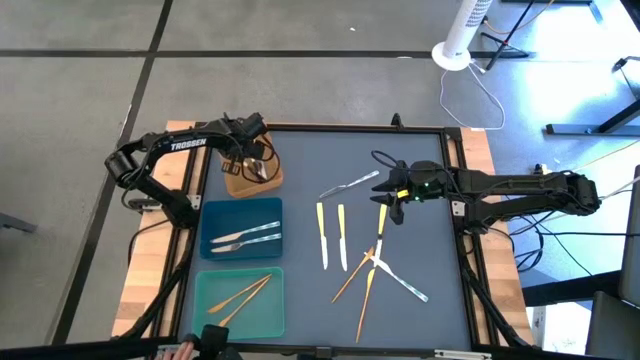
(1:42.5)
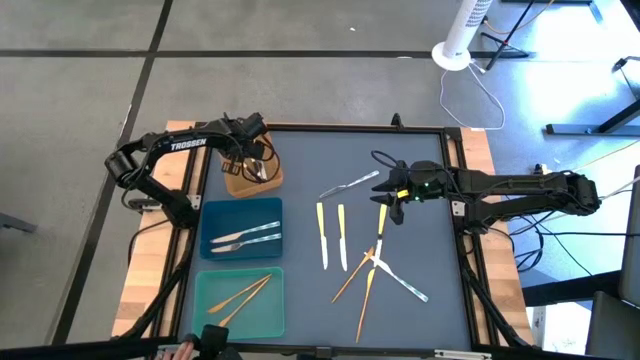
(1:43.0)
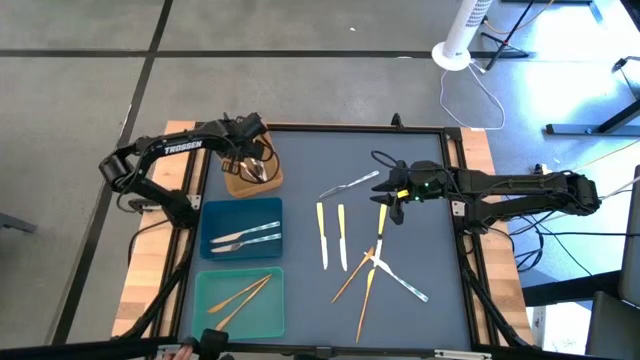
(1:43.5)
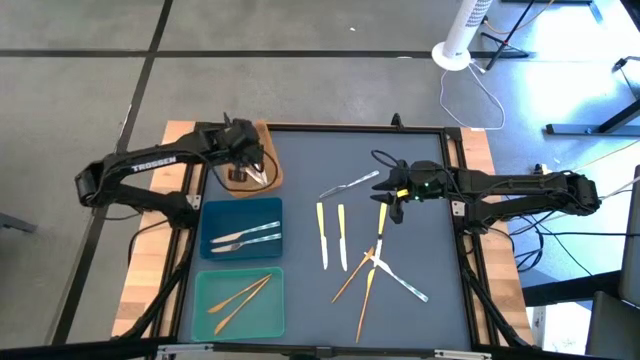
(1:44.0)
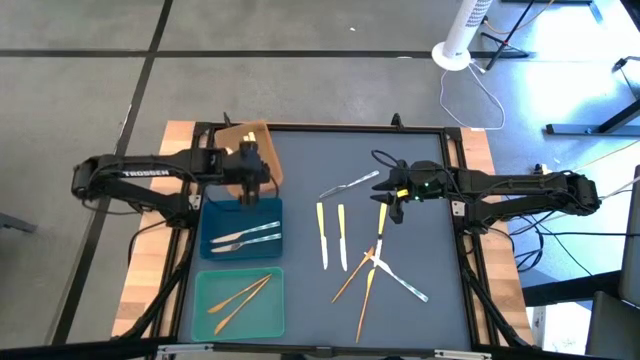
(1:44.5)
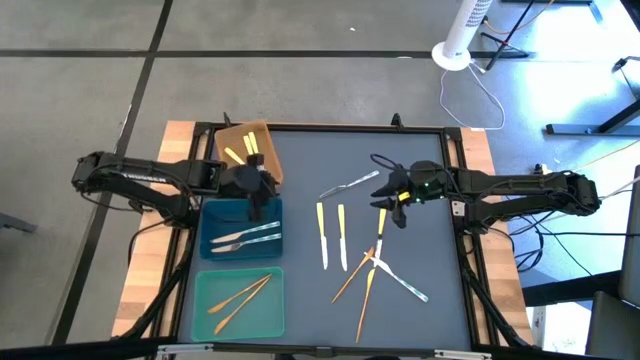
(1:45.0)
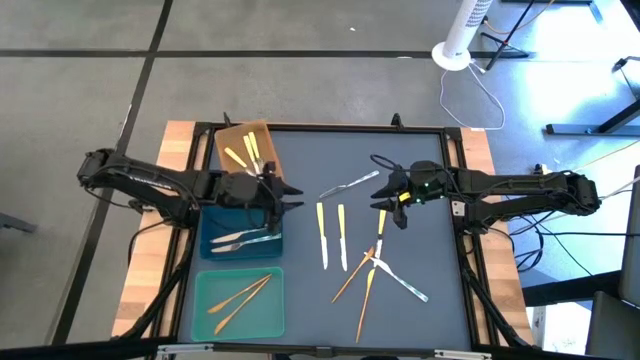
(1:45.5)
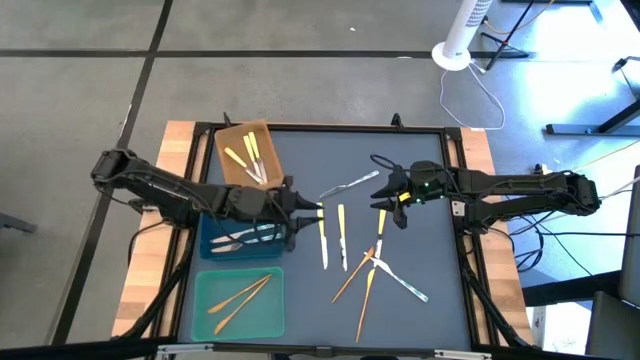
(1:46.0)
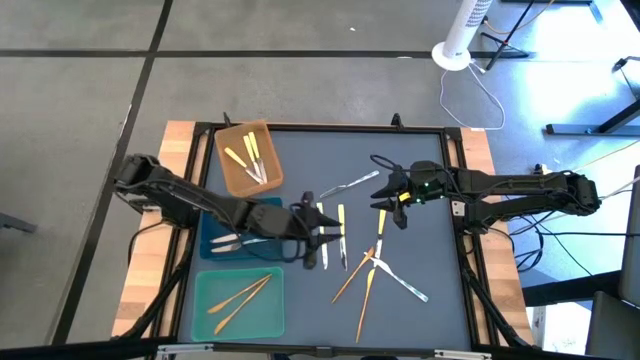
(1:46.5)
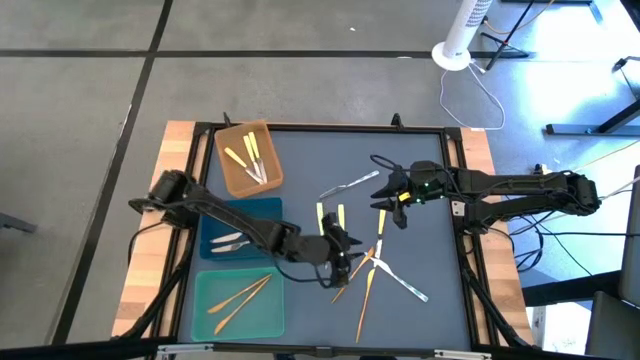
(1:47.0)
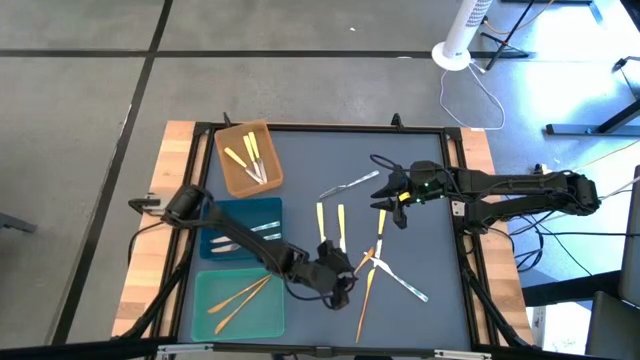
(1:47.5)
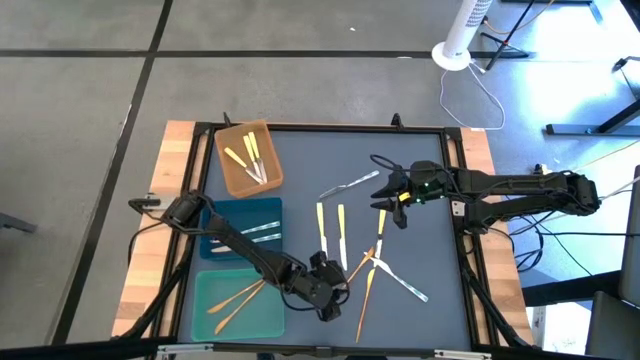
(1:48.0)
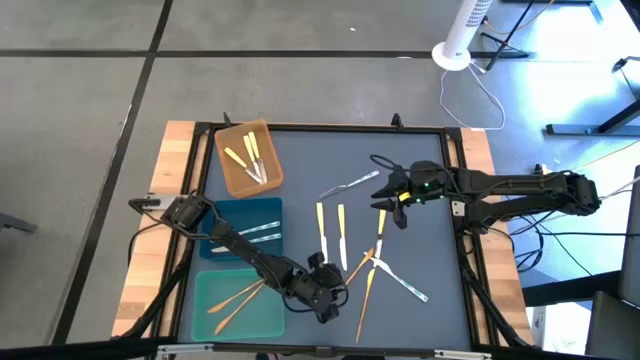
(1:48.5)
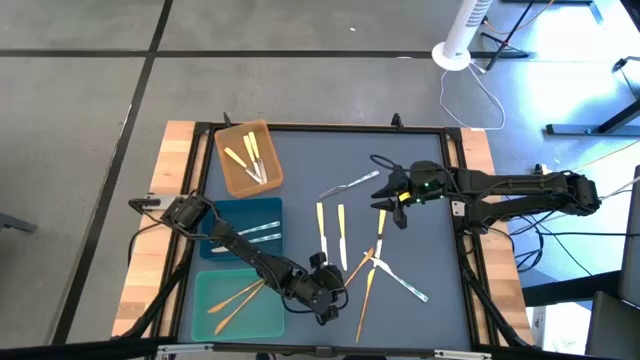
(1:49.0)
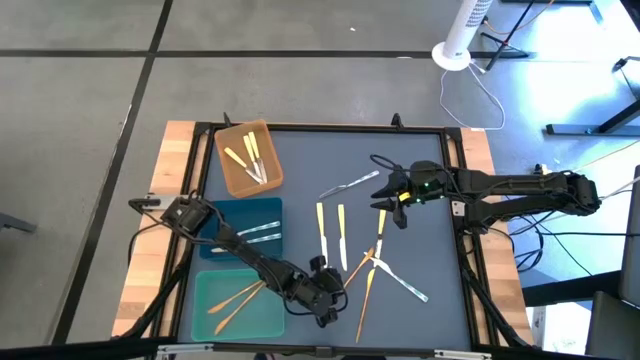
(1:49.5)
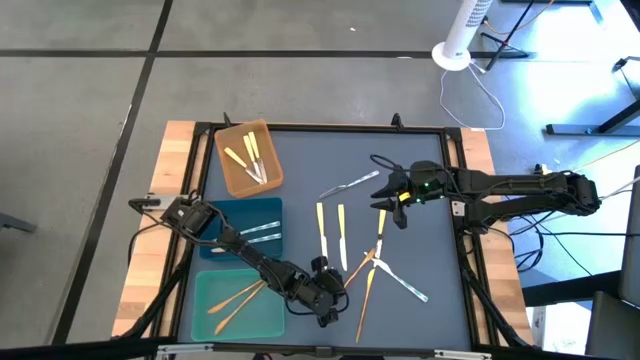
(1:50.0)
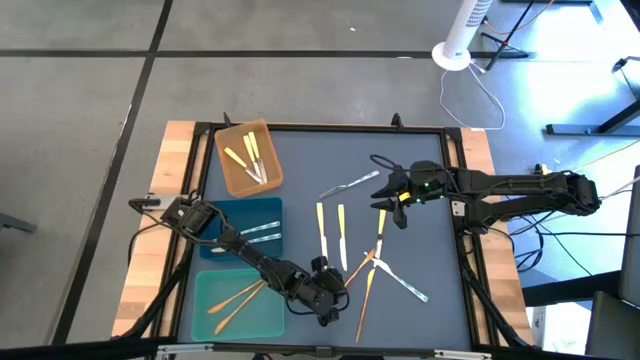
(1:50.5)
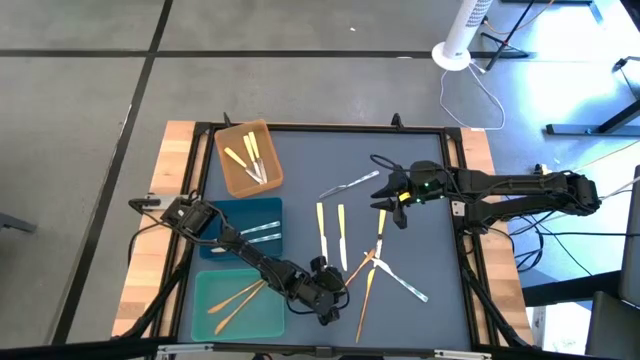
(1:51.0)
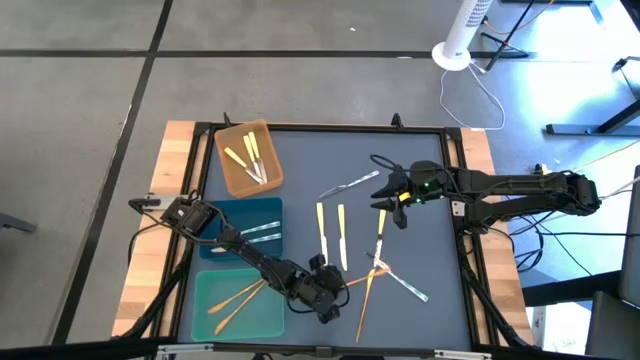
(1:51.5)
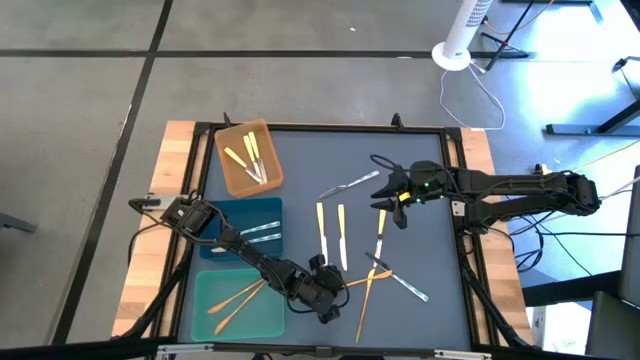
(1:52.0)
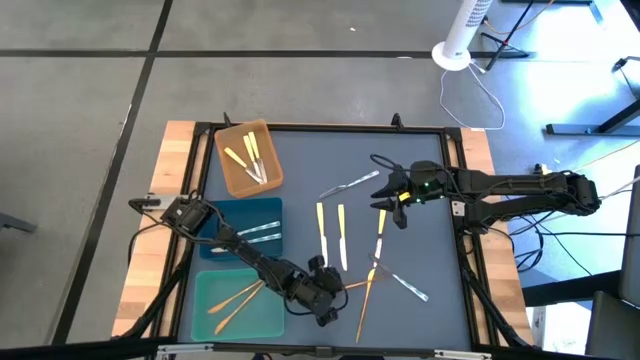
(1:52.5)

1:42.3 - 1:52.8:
Task: Sort silverware by color (type)
Put the gold knife into the green bin

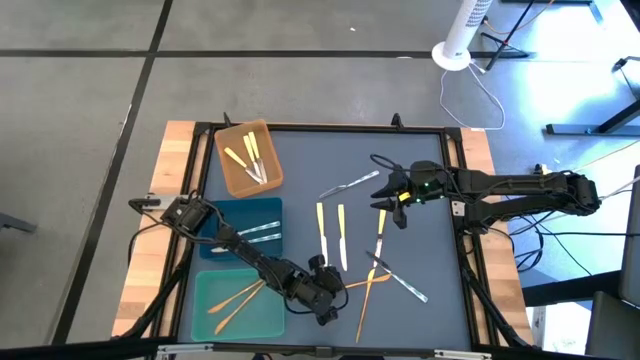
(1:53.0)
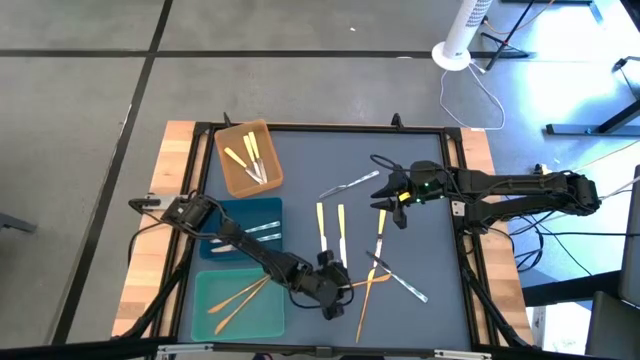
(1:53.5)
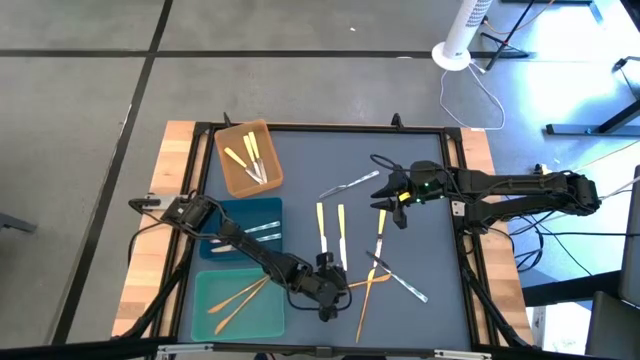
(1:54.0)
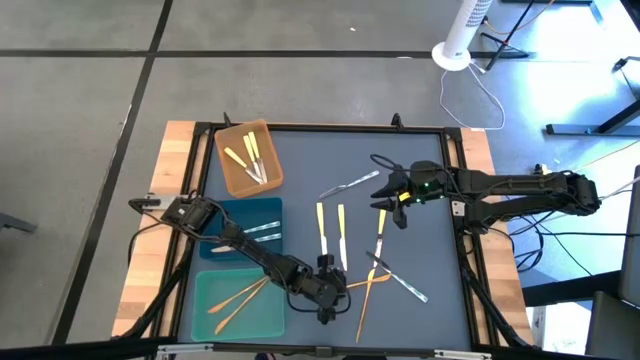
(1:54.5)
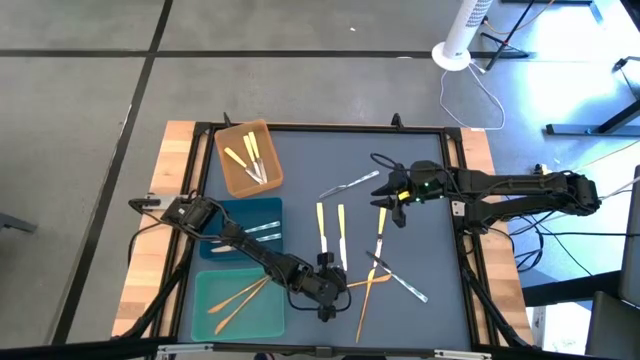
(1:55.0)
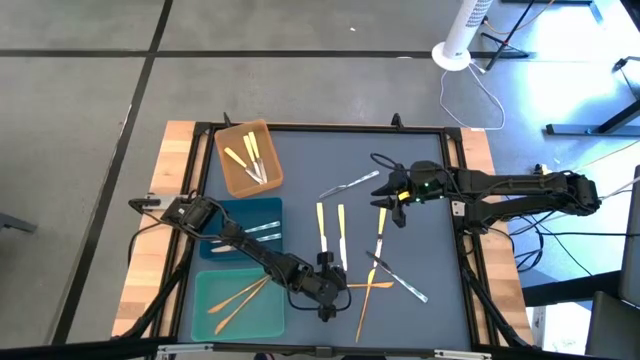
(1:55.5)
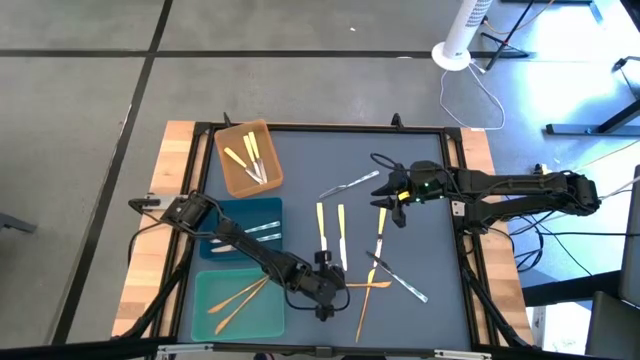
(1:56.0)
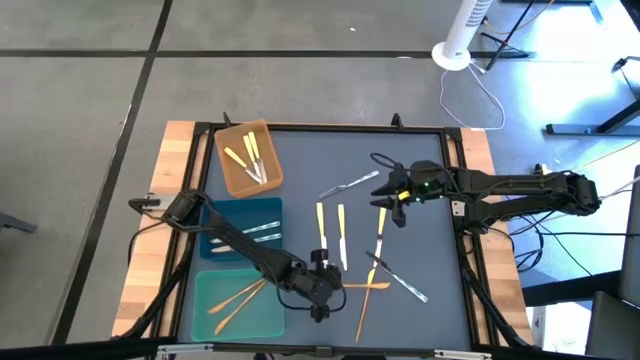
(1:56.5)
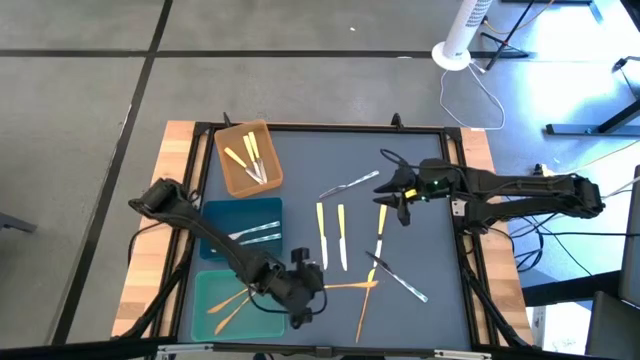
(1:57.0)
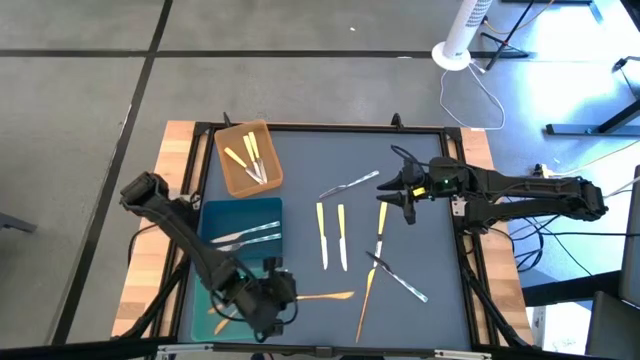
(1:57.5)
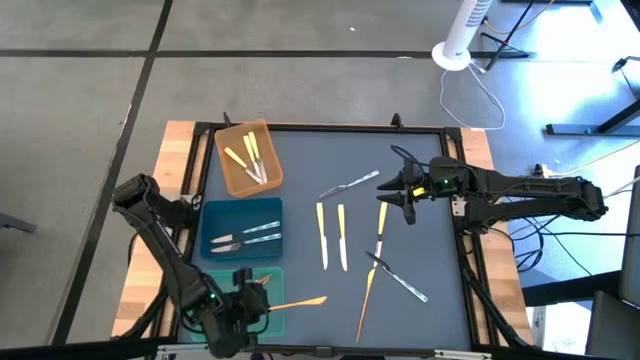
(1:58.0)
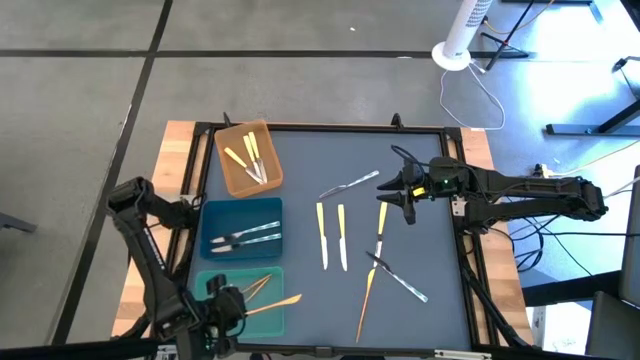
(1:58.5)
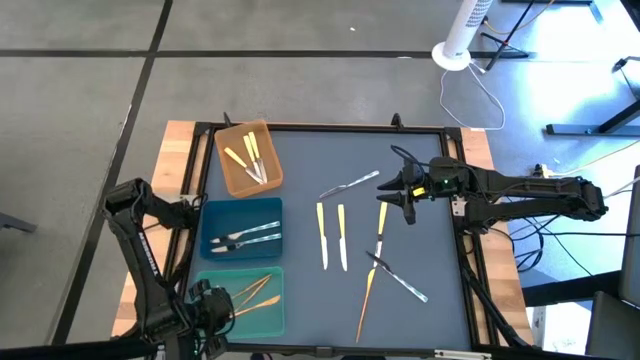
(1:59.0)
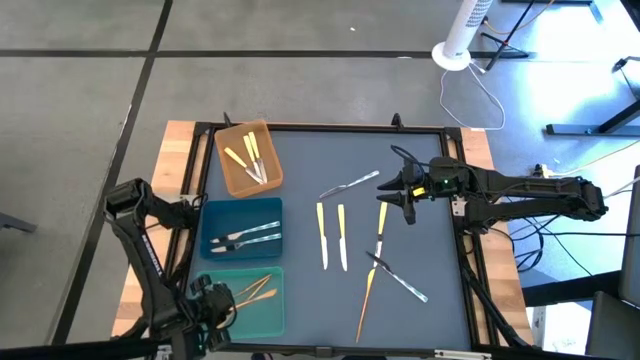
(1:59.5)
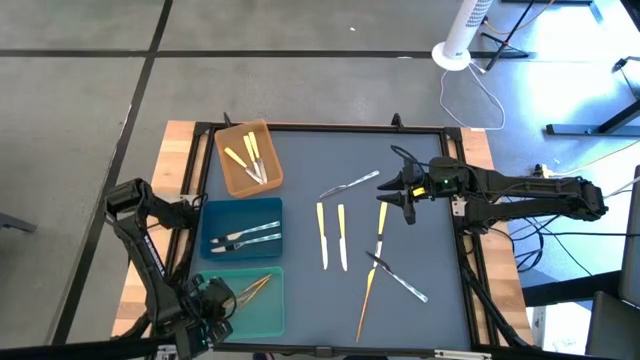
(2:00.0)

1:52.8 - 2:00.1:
Put the gold knife into the green bin

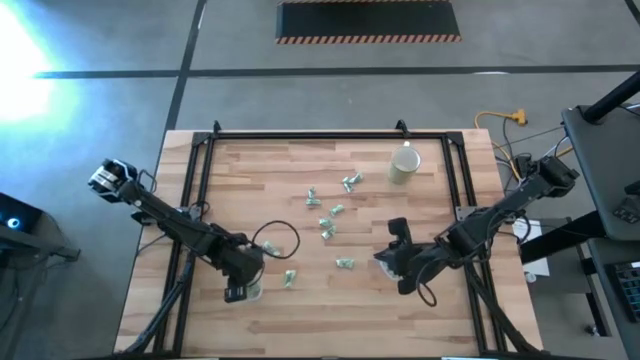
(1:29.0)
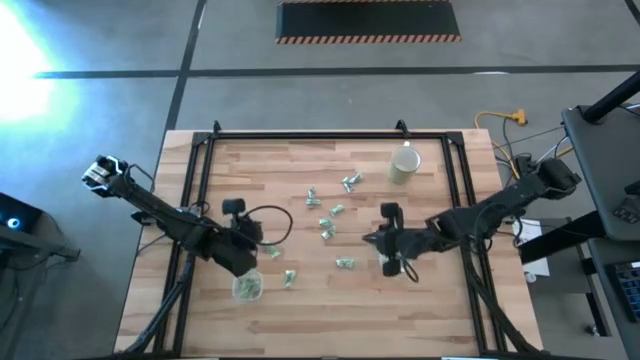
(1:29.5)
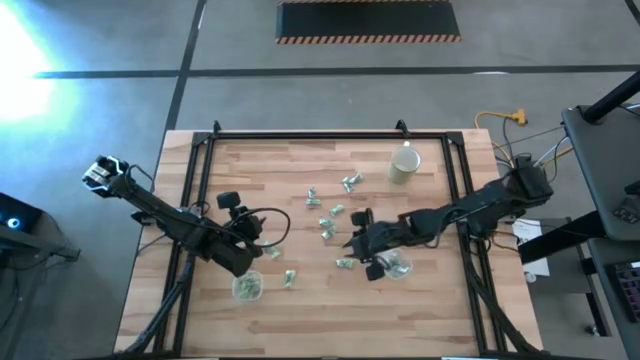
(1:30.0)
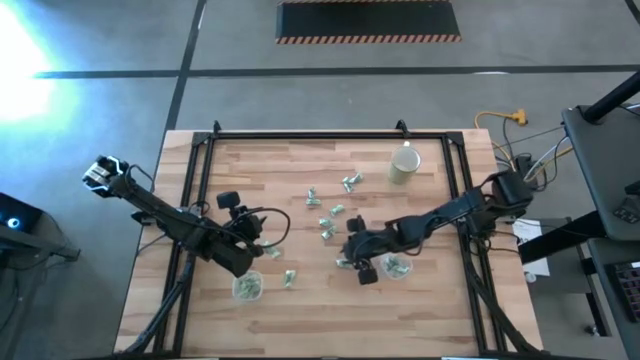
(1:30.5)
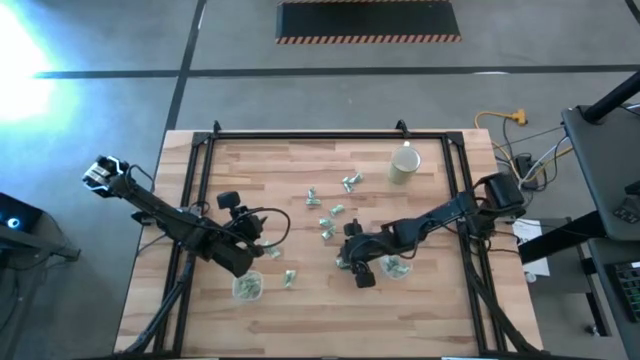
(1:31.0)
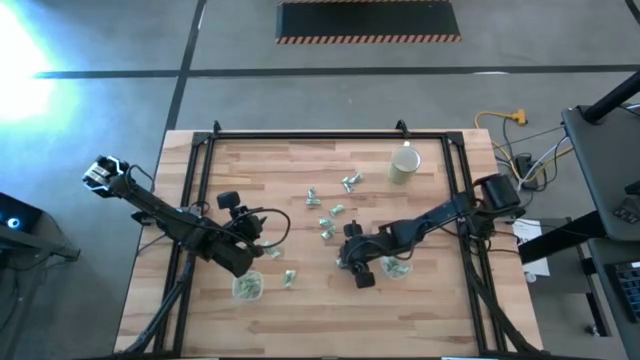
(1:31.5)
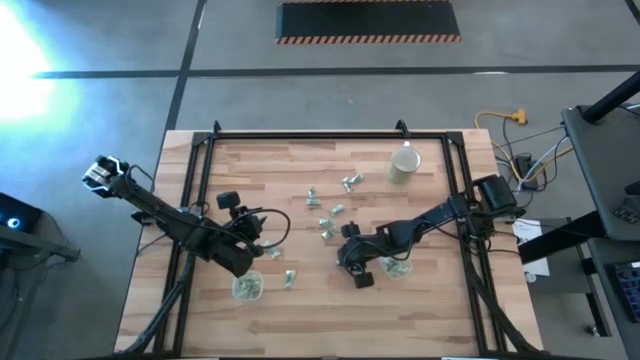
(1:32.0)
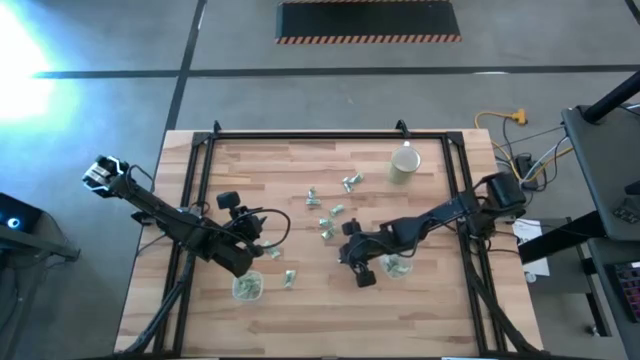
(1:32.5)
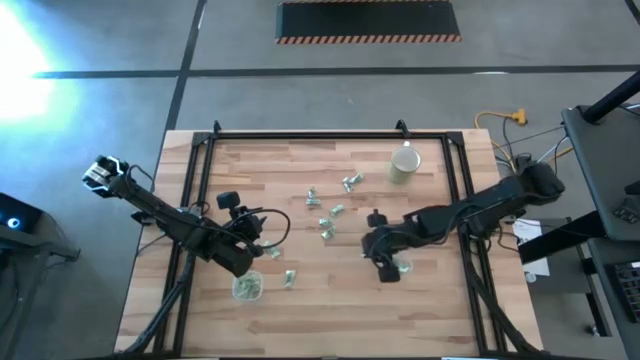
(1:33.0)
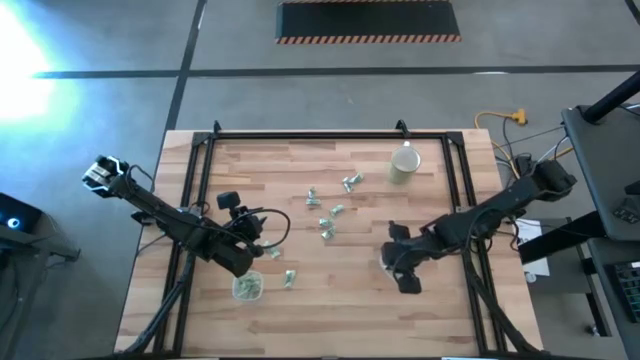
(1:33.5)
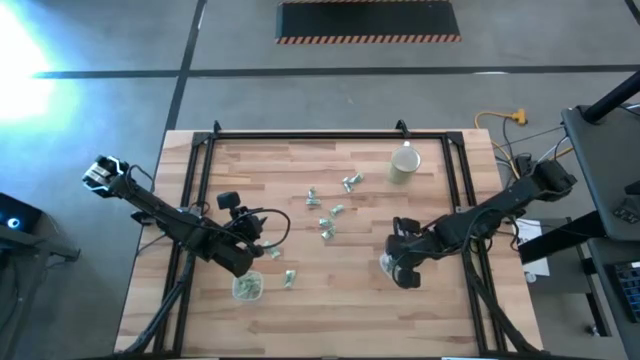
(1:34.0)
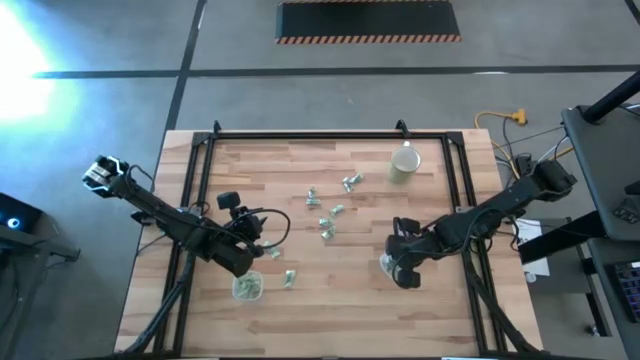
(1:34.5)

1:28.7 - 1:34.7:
Task: Pick and place Stevia / Truvia into bins
Put the stevia packet into the right transparent container
